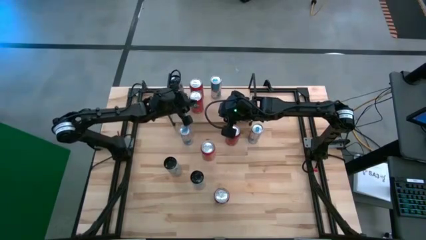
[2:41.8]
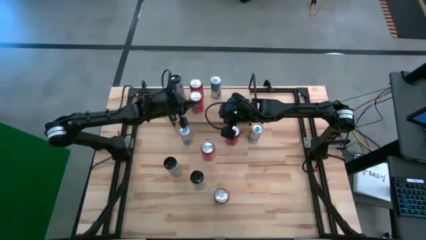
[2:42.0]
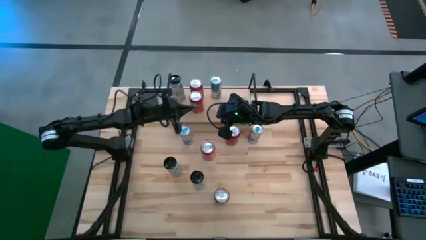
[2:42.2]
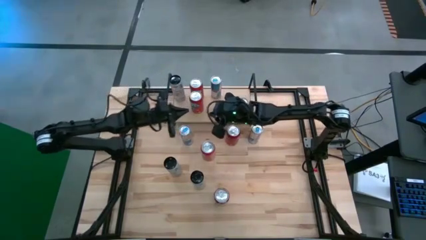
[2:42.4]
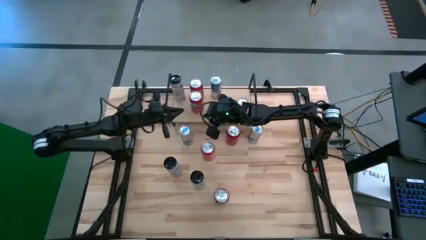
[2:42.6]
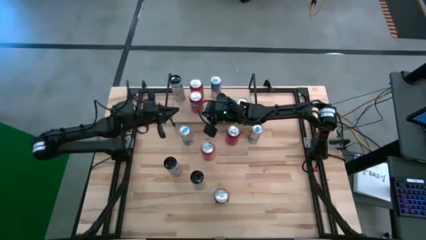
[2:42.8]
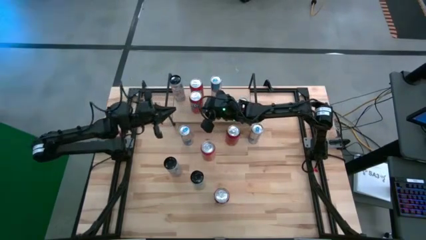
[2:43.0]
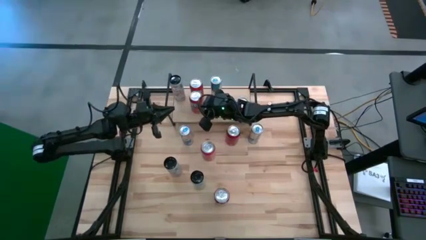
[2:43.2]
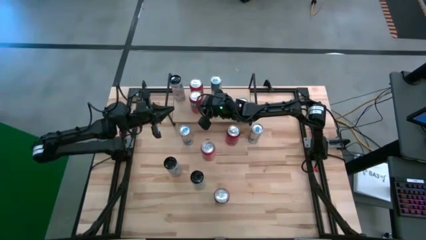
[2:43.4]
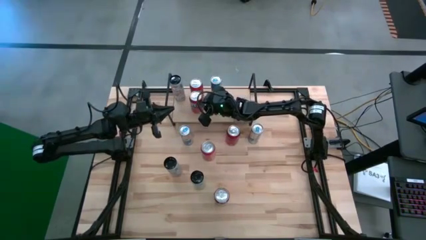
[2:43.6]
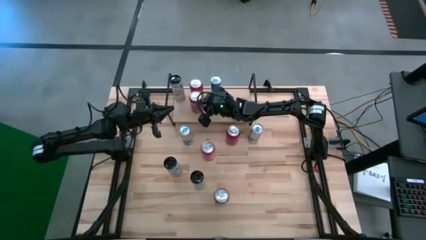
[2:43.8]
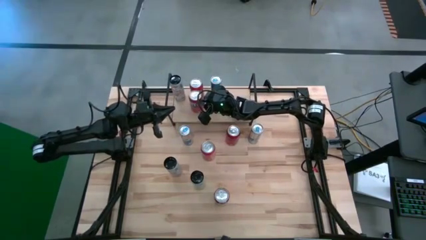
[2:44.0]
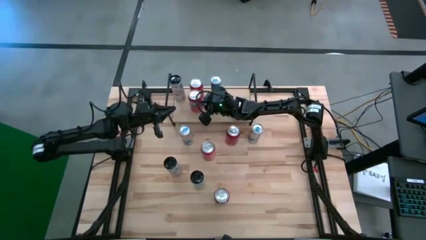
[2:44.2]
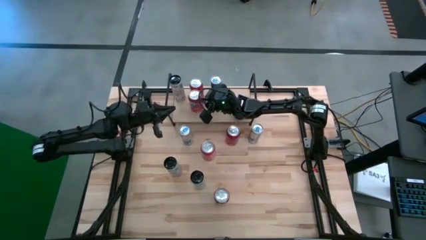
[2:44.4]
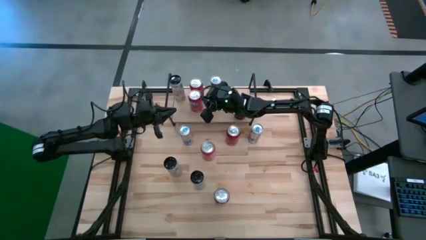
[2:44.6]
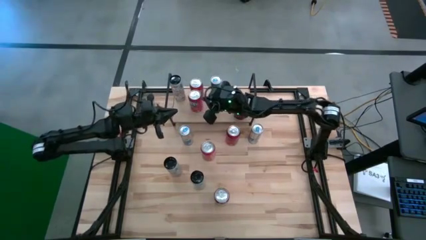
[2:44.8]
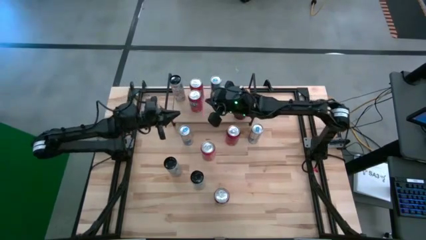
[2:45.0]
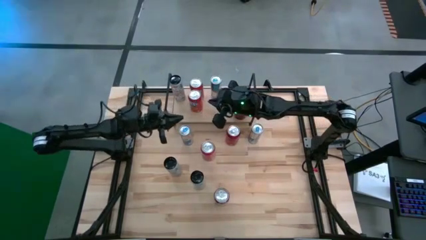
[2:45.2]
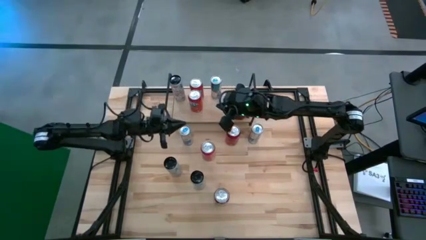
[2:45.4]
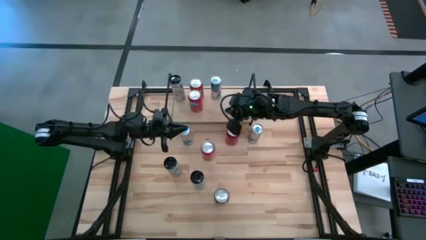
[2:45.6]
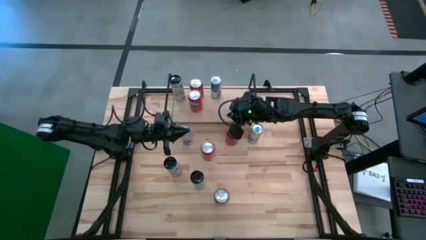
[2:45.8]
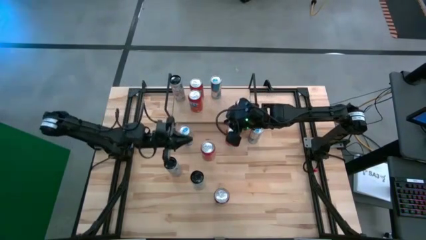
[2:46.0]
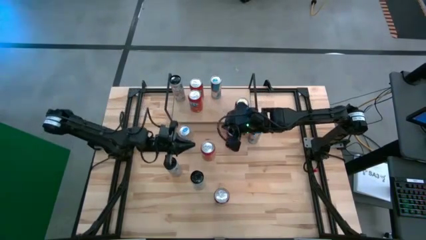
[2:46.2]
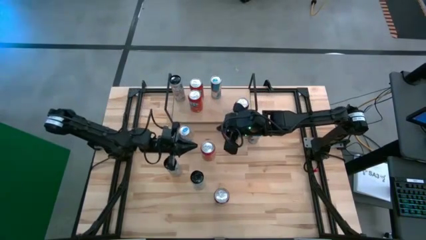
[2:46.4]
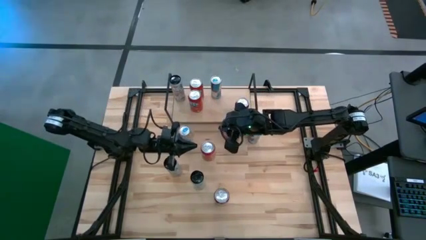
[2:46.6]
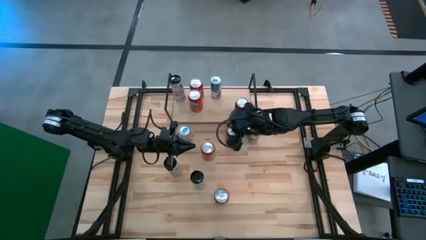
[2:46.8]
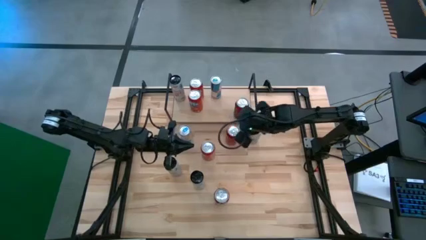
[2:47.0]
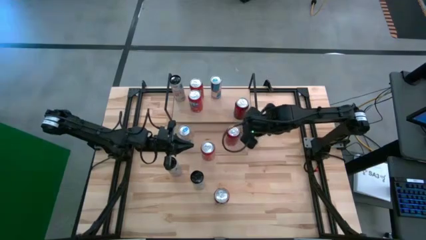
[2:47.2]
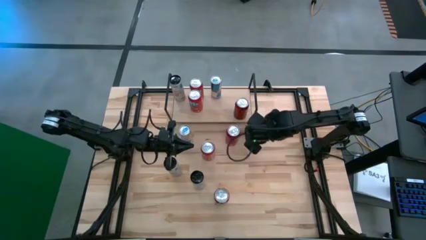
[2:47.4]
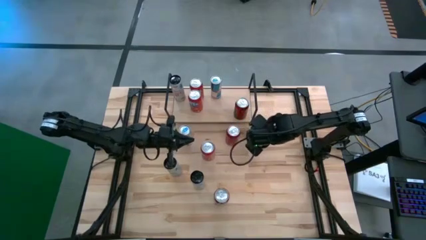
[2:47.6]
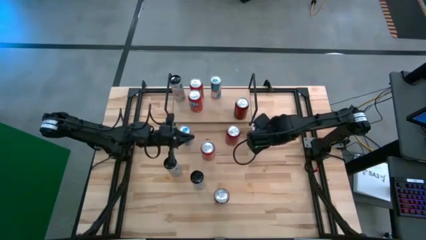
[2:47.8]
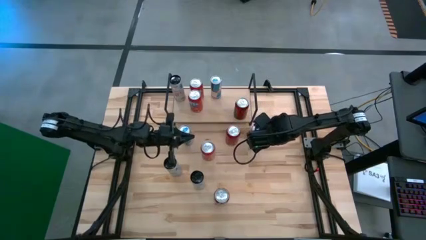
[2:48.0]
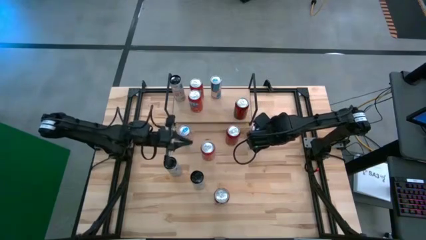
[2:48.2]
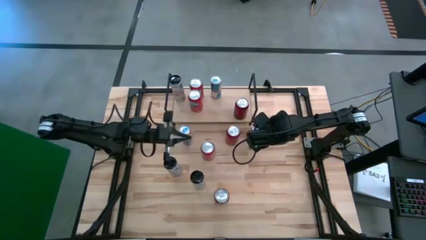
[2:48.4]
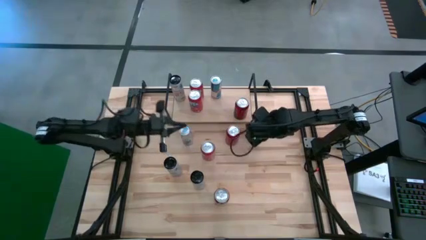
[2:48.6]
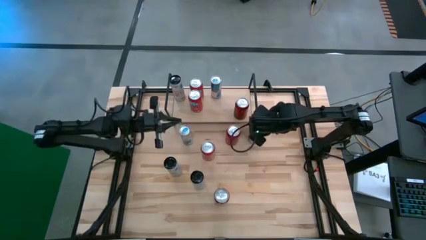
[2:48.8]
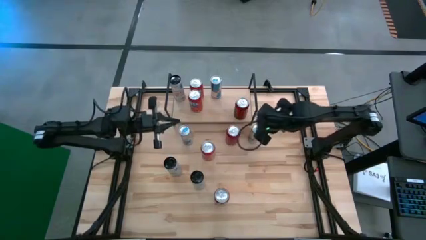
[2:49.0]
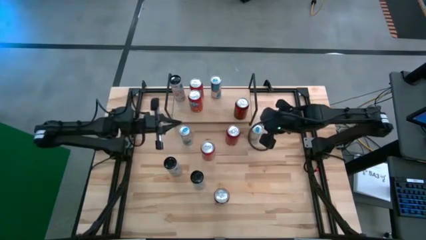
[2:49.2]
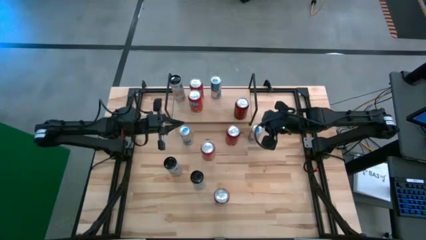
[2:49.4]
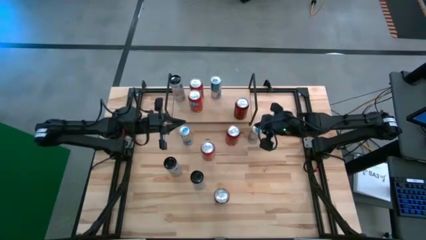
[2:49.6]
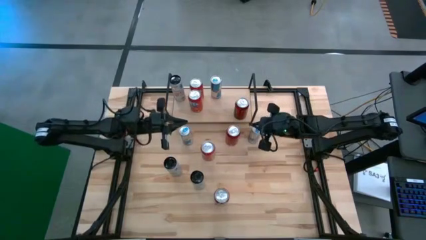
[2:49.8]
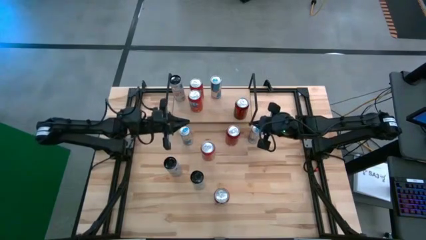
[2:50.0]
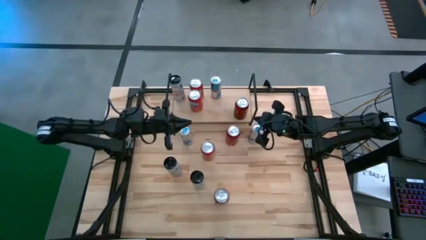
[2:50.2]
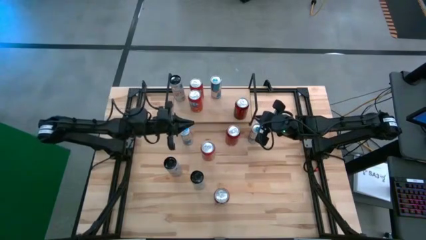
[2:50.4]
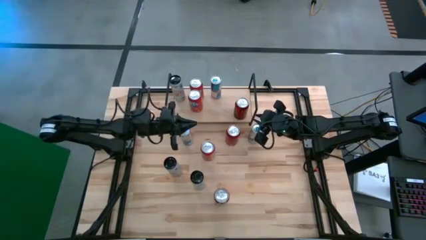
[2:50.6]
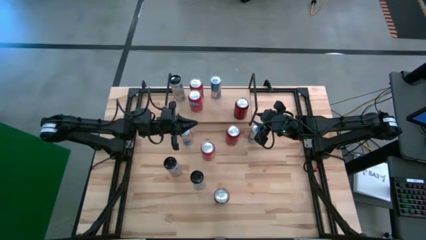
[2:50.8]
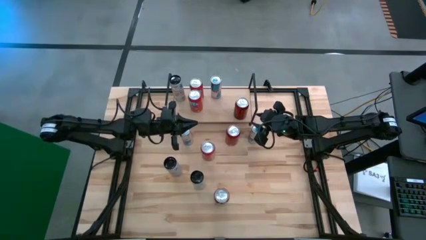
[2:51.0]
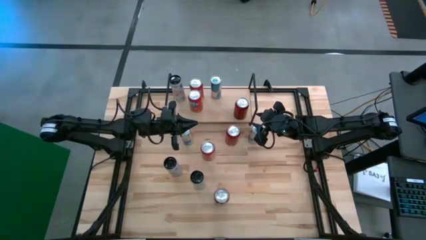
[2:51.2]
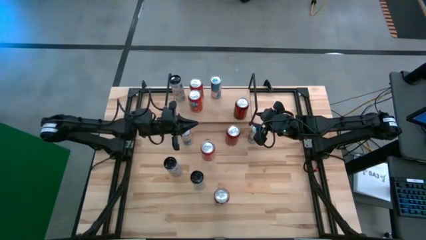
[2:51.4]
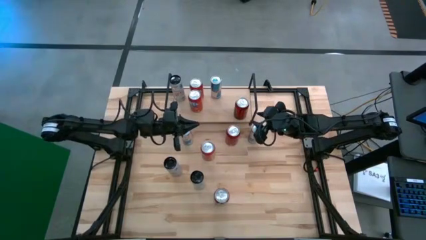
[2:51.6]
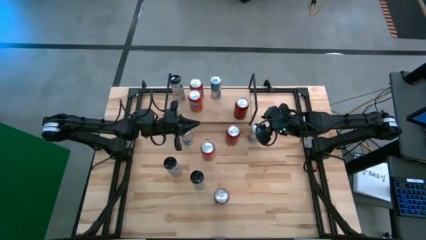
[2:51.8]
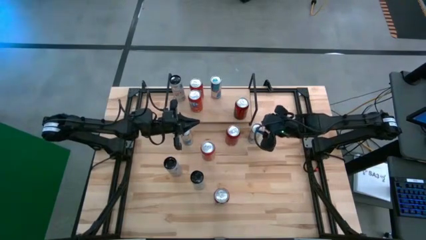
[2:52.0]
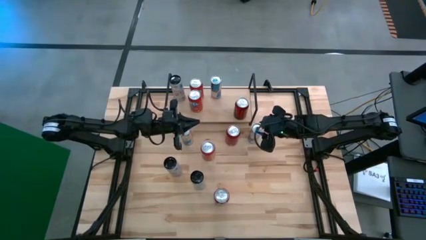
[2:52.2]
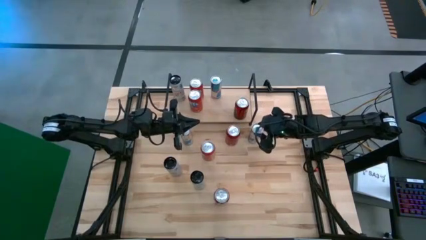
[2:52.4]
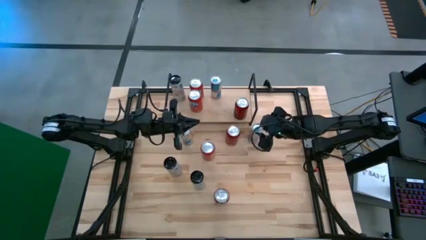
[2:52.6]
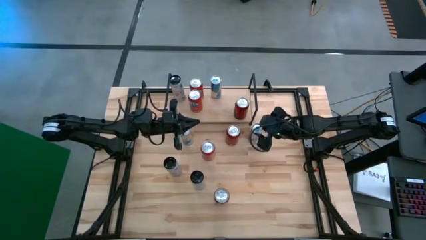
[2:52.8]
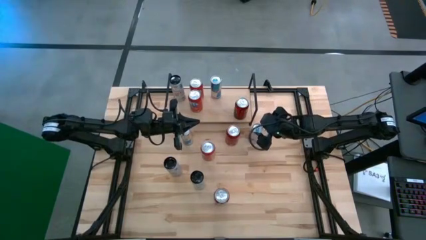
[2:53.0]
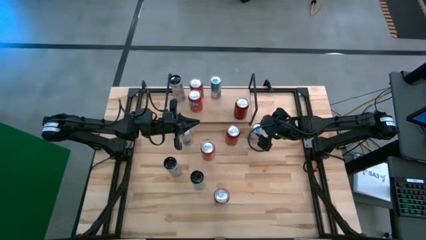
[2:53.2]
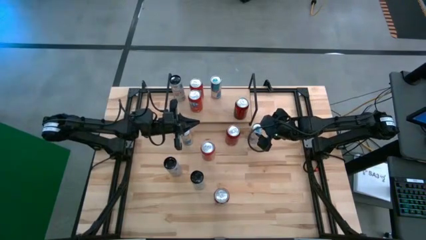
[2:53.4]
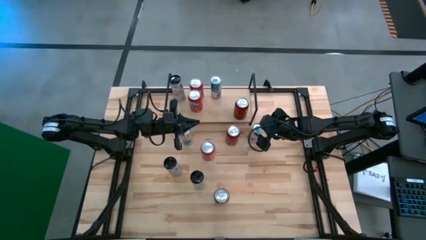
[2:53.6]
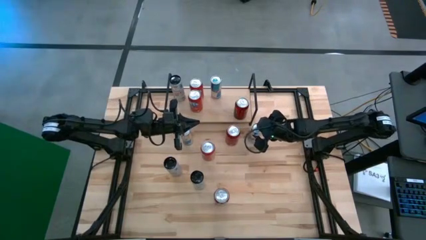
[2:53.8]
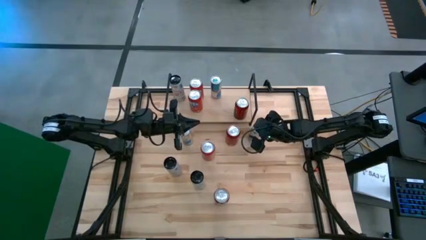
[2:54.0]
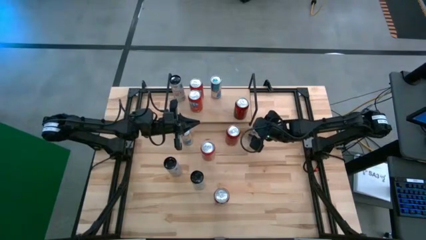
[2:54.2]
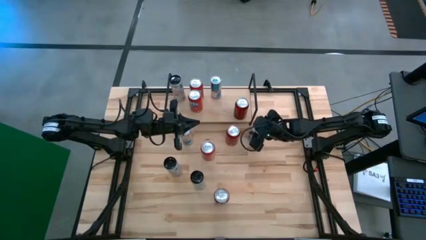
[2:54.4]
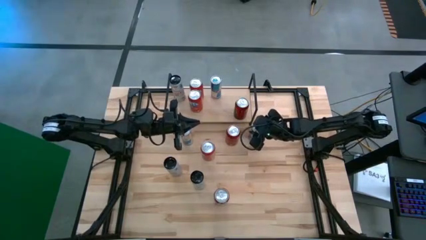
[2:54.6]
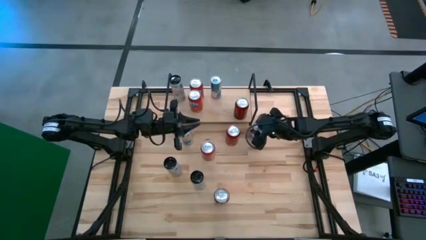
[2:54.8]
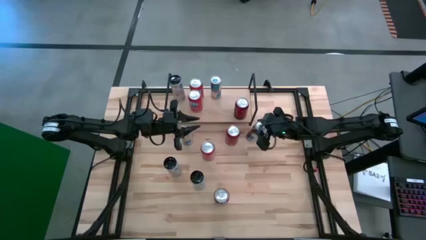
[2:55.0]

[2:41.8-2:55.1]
Task: Place canned beverage on shelf
Put the right blue soda can on the shelf aligned with the other blue soda can
